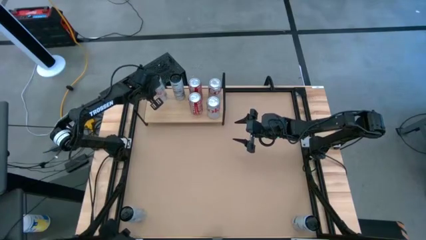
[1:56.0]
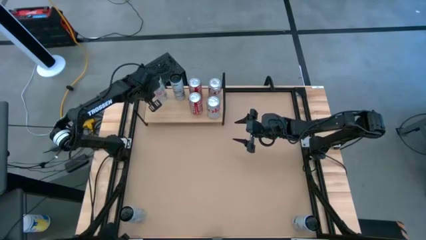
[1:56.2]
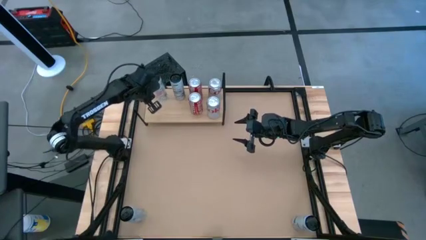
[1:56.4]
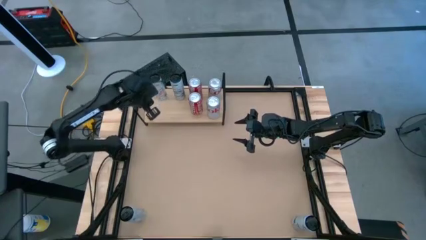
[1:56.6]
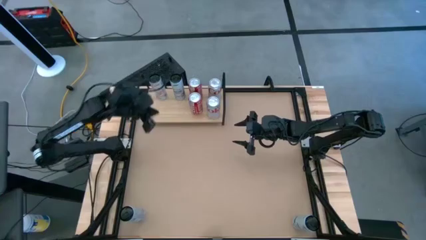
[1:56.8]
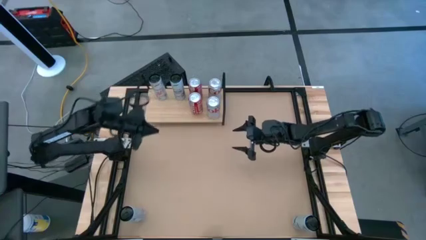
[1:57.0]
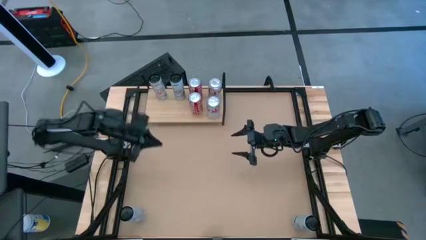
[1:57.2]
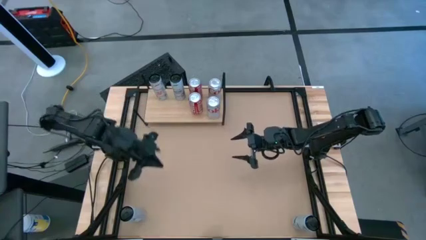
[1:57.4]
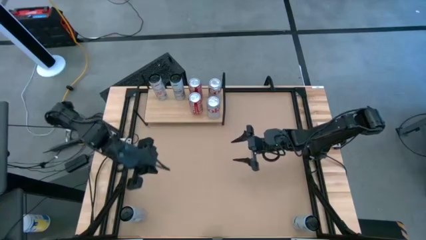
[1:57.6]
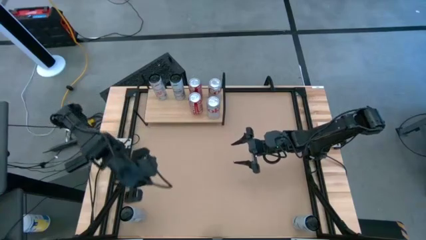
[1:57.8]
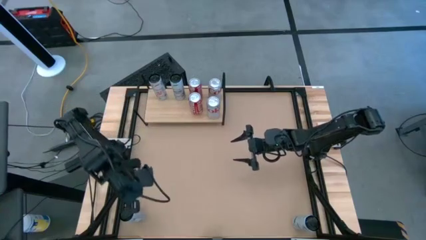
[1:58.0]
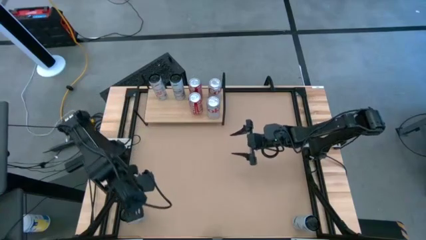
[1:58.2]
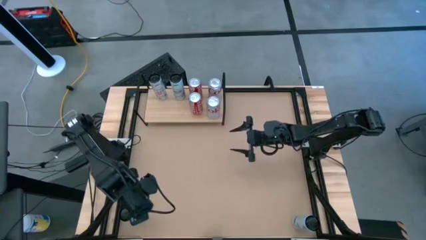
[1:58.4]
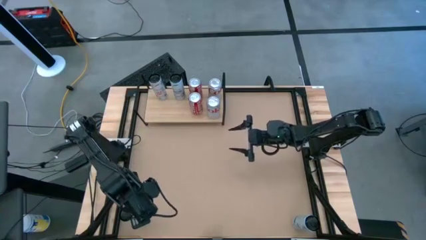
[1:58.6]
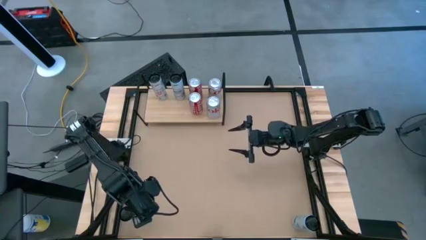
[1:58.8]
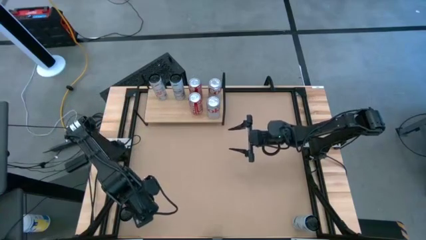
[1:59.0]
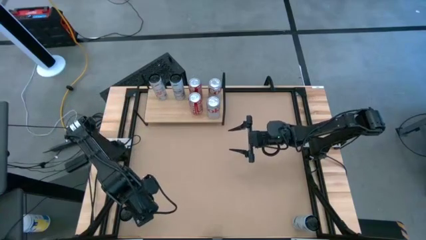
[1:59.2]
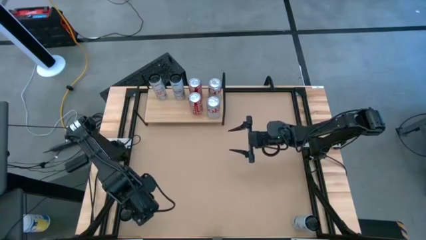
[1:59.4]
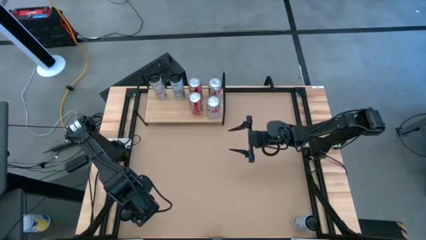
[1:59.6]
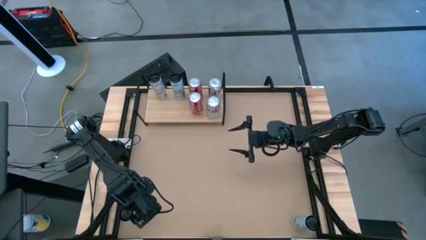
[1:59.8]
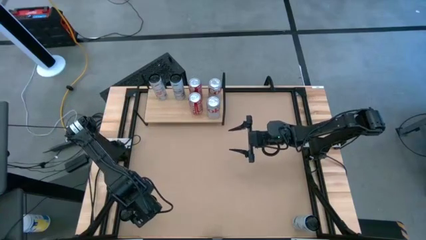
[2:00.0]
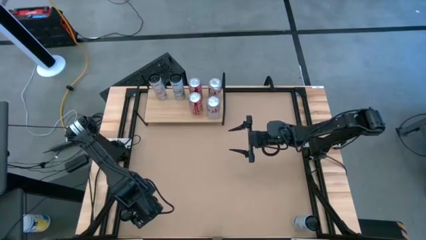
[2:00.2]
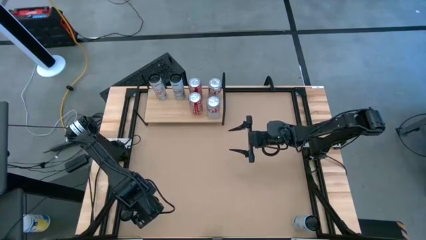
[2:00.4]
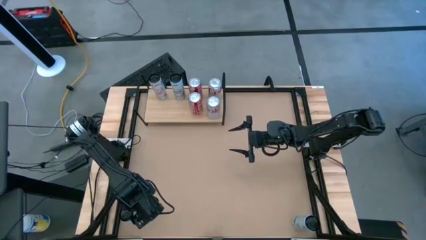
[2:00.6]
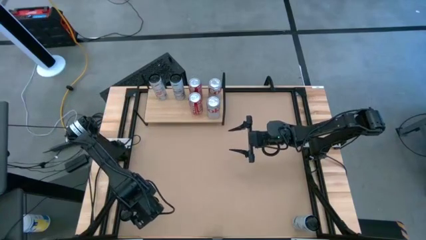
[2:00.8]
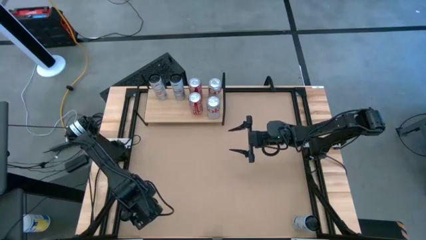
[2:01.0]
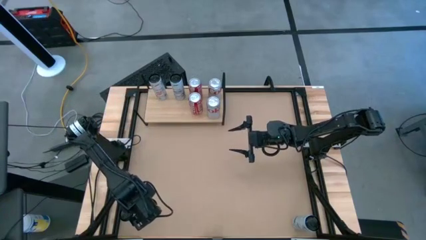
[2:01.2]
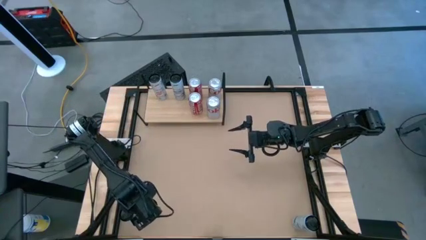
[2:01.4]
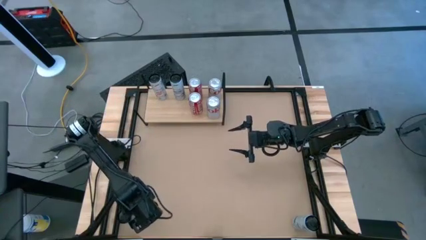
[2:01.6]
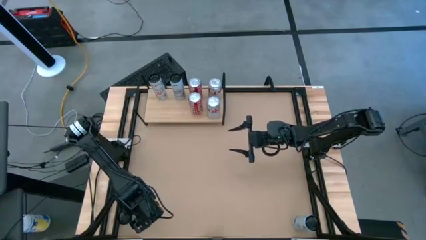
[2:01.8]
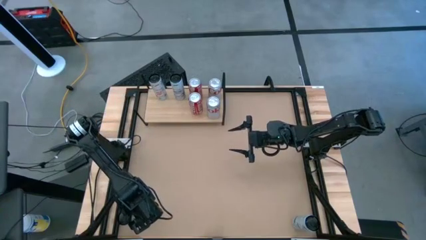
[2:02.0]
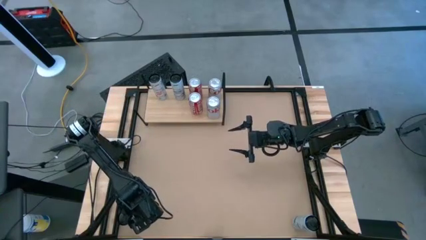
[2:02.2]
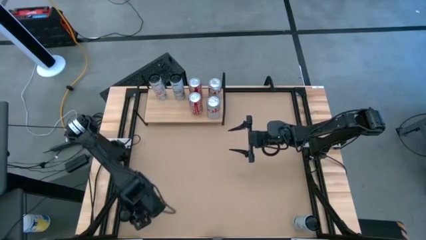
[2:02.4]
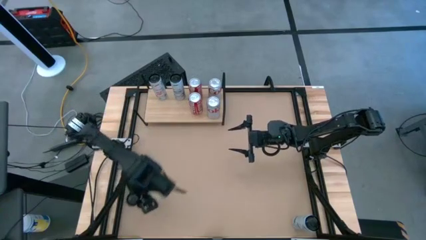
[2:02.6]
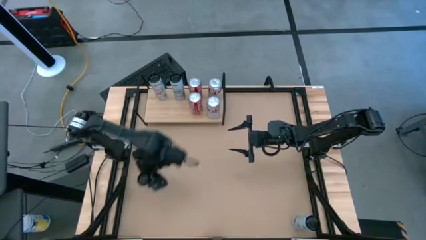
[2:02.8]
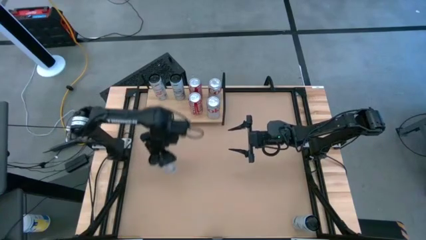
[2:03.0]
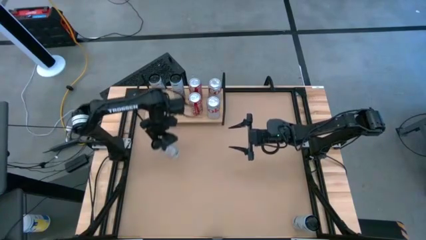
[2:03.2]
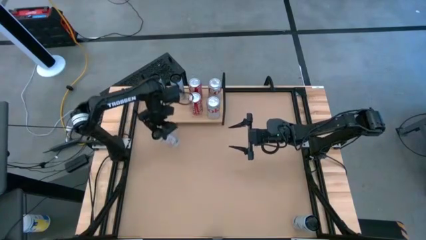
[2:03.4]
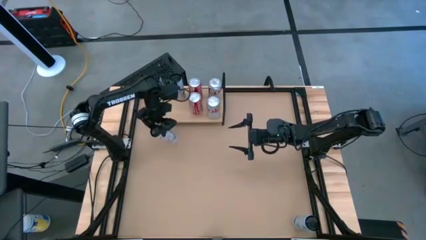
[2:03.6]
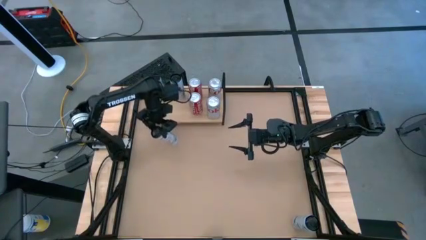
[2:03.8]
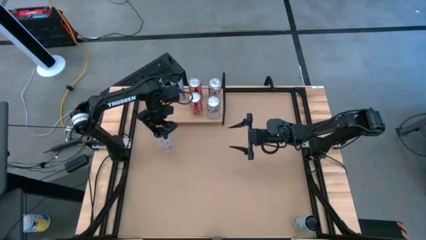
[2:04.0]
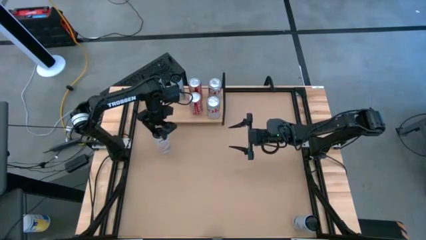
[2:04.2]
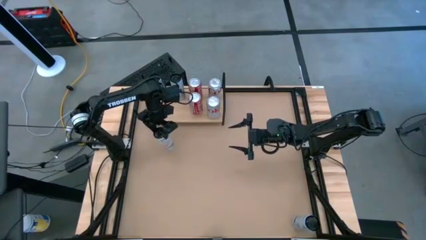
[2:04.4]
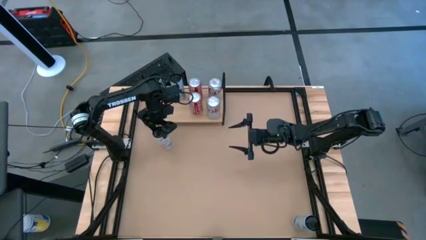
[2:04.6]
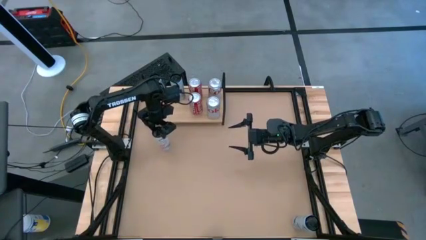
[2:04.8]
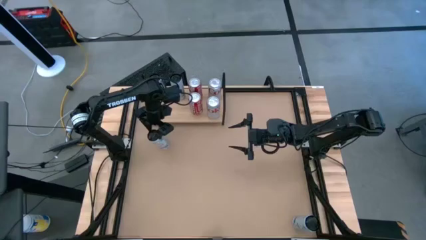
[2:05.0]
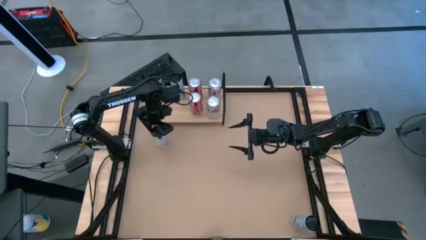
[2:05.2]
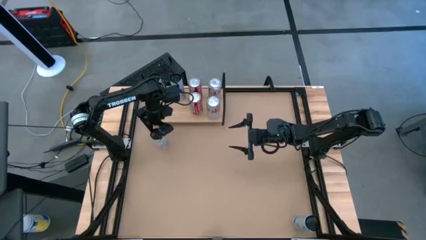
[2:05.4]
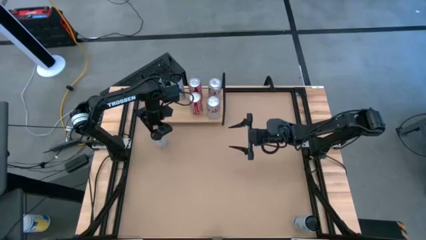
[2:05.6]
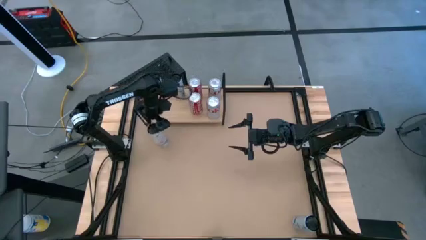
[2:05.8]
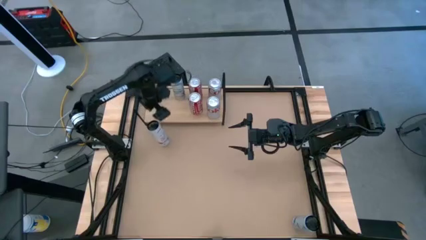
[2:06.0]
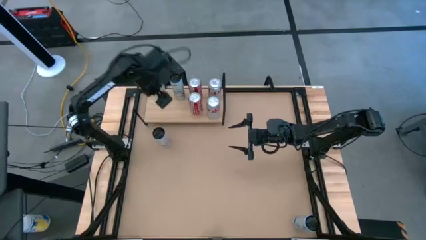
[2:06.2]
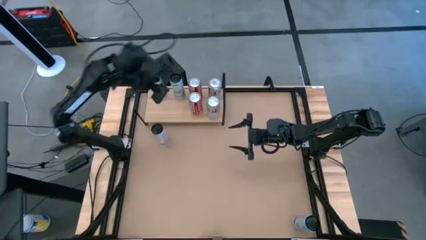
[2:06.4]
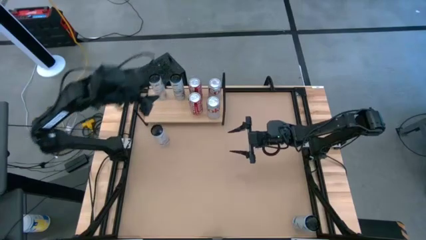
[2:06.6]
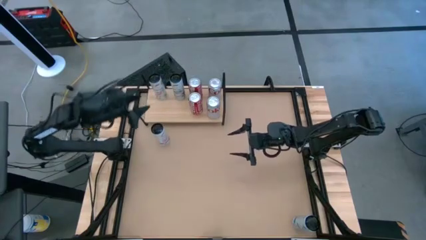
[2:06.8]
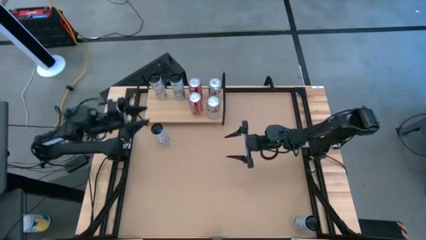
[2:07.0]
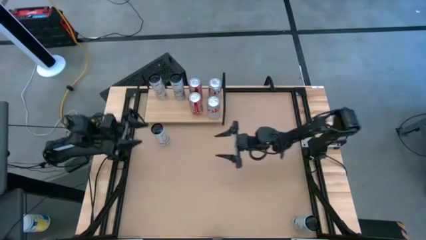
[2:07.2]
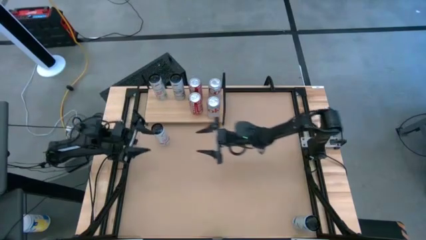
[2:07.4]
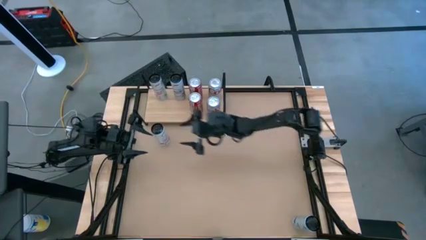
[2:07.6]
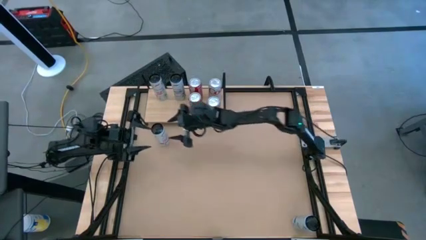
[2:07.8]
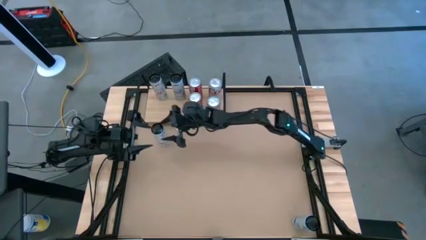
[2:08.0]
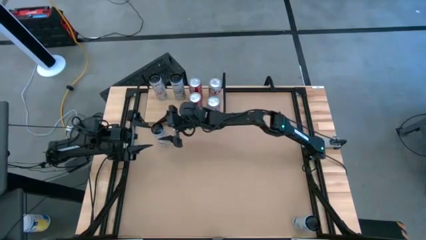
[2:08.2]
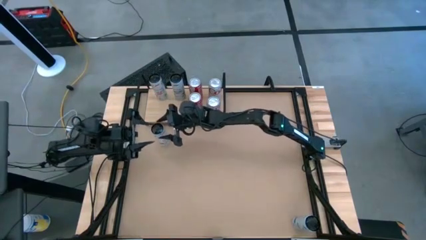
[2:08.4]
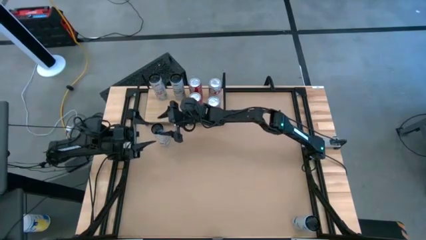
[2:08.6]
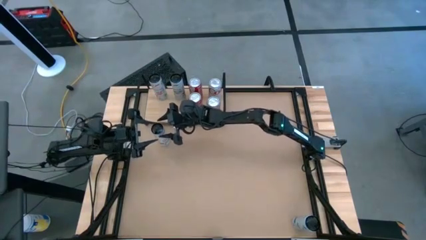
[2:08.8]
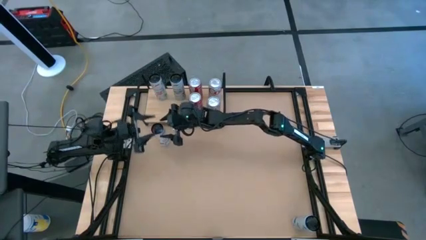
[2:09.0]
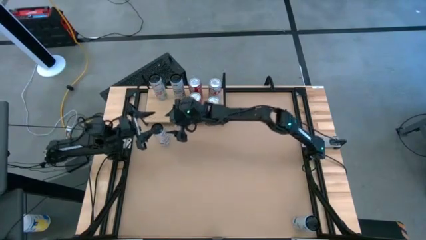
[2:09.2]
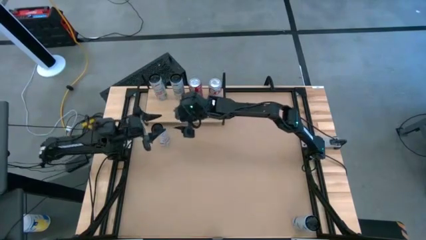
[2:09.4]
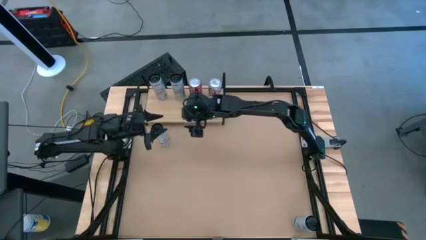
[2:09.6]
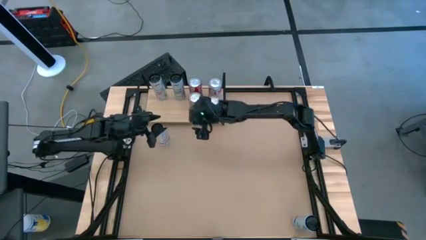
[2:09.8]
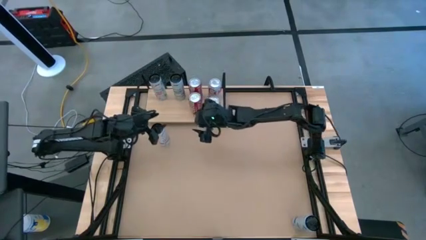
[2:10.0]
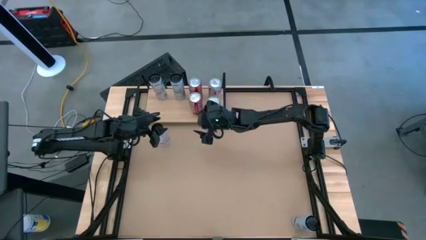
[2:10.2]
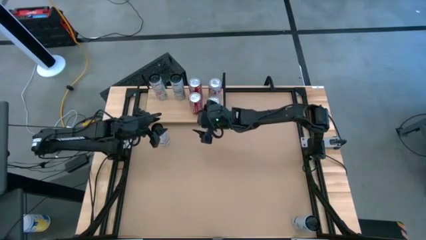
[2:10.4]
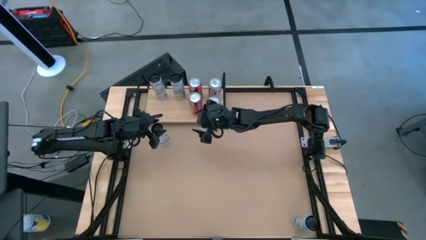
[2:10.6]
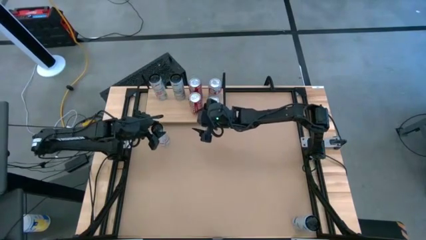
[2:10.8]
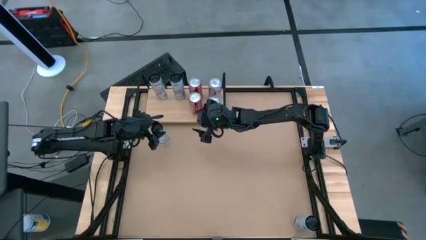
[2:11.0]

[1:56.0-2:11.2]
Task: Place canned beverage on shelf
Put the white and pink soda can on the shelf aligned with the other white and pink soda can
